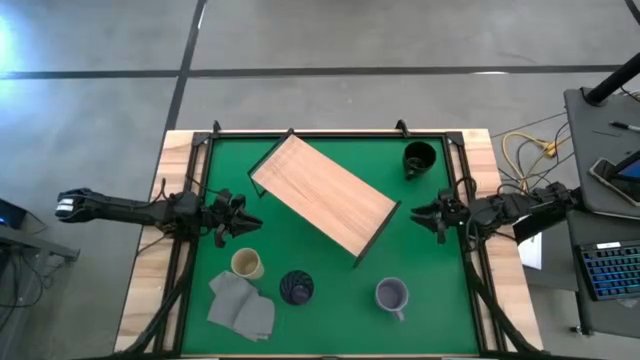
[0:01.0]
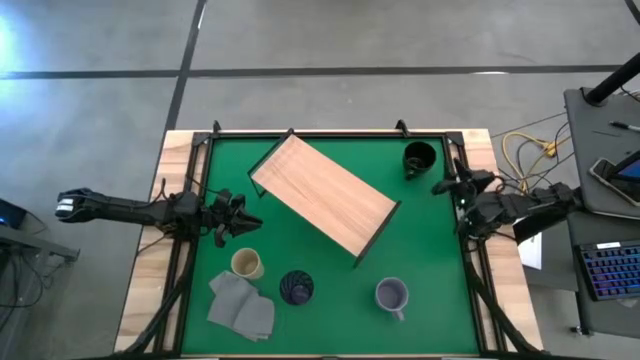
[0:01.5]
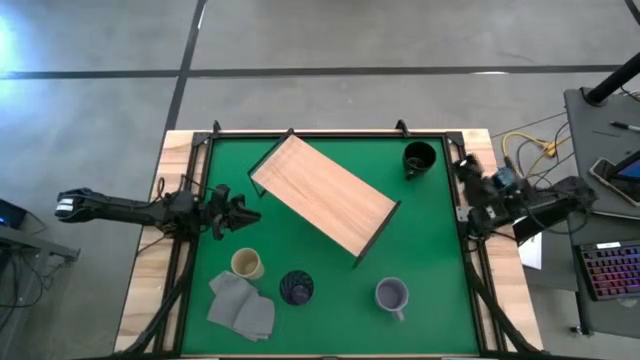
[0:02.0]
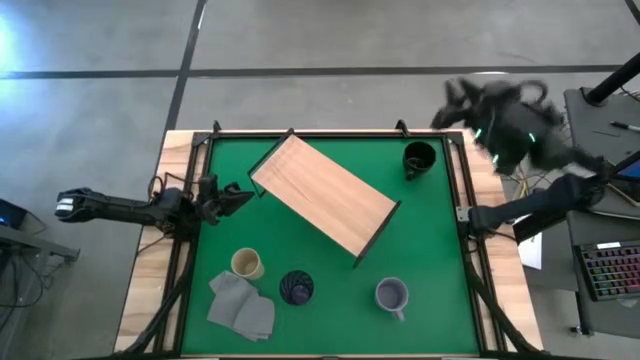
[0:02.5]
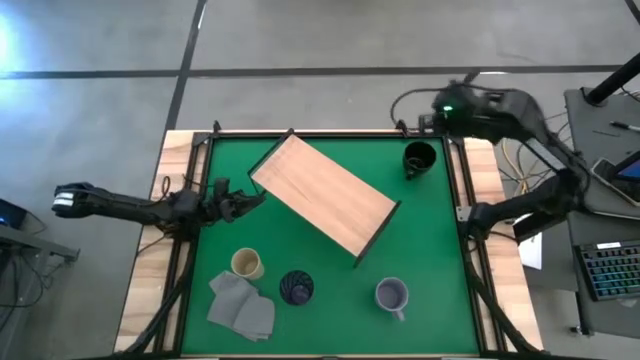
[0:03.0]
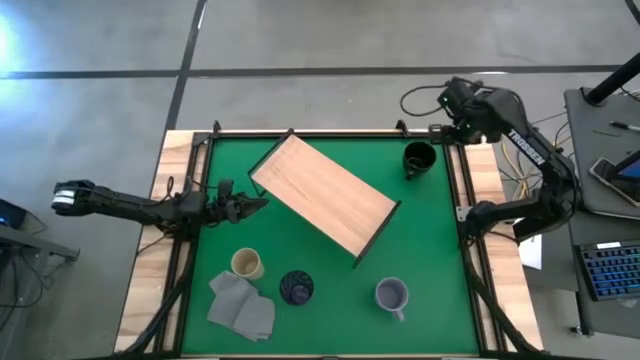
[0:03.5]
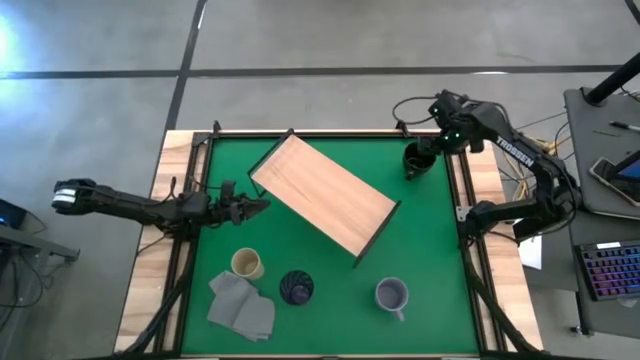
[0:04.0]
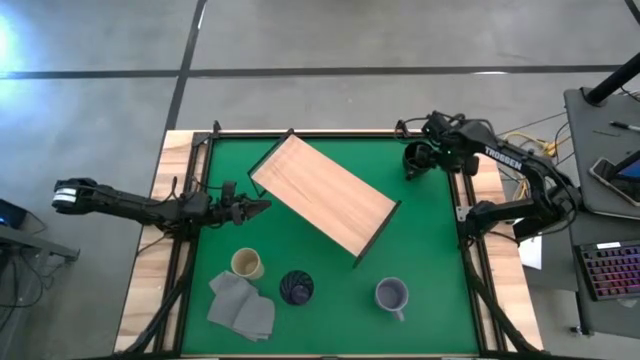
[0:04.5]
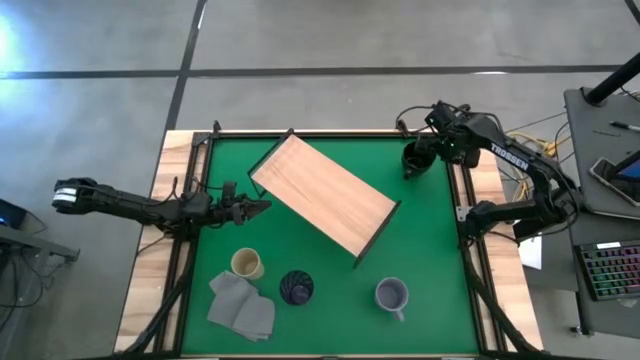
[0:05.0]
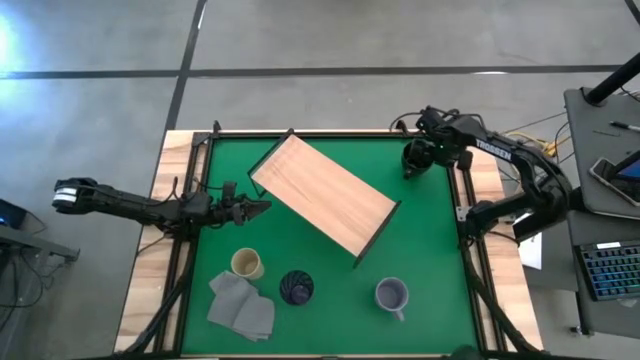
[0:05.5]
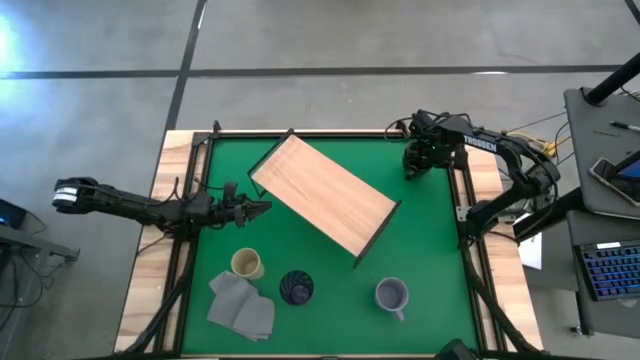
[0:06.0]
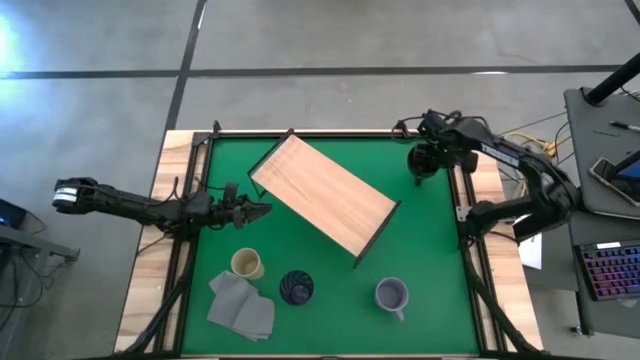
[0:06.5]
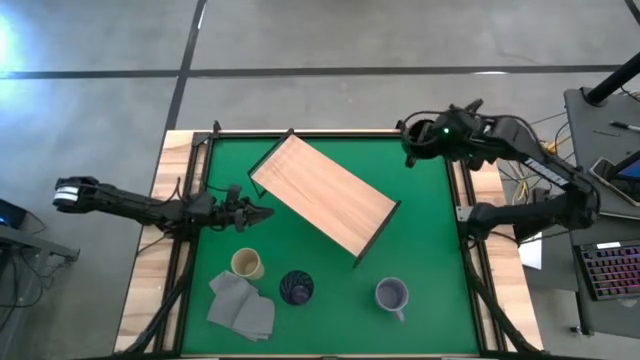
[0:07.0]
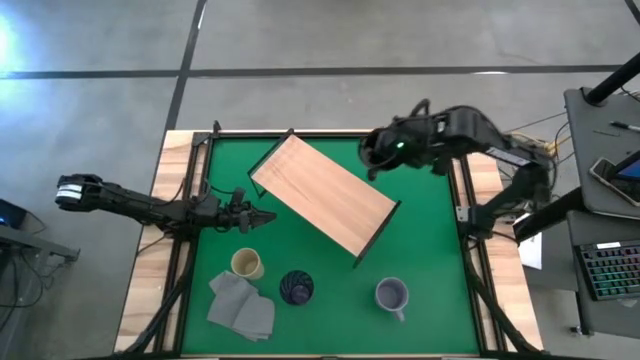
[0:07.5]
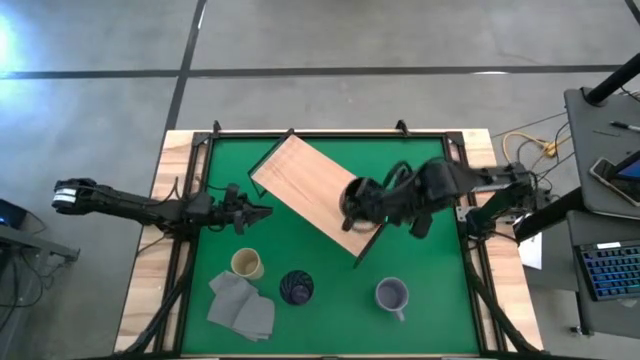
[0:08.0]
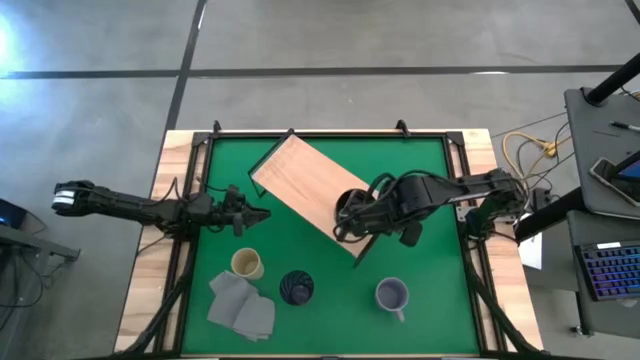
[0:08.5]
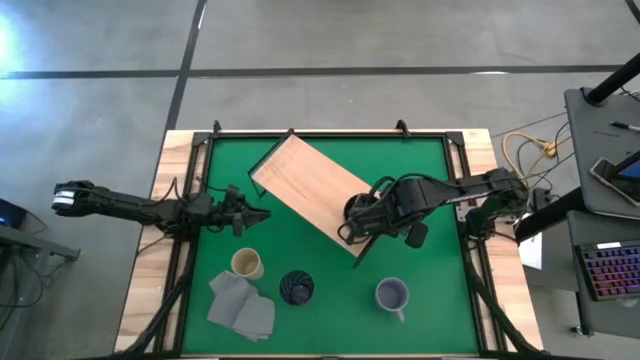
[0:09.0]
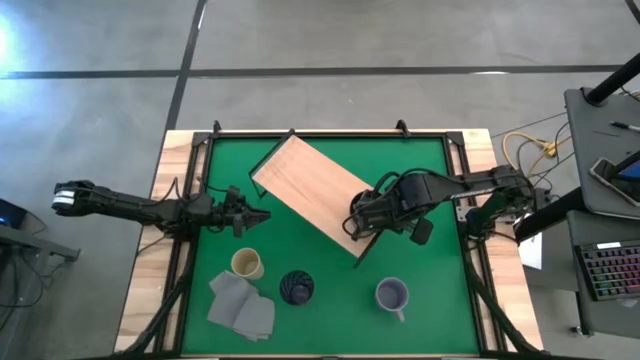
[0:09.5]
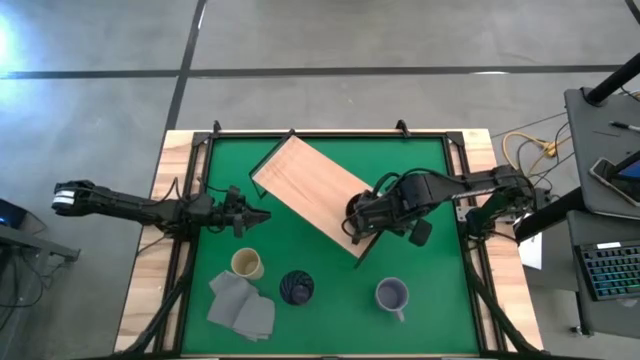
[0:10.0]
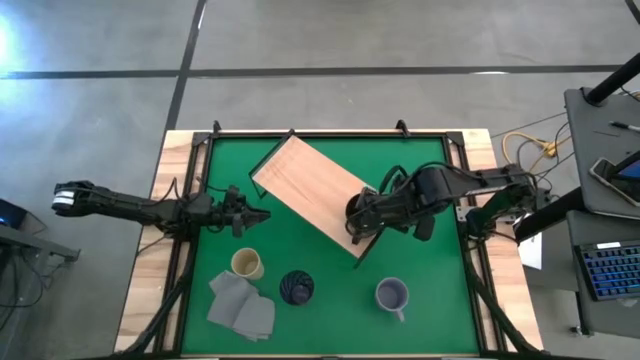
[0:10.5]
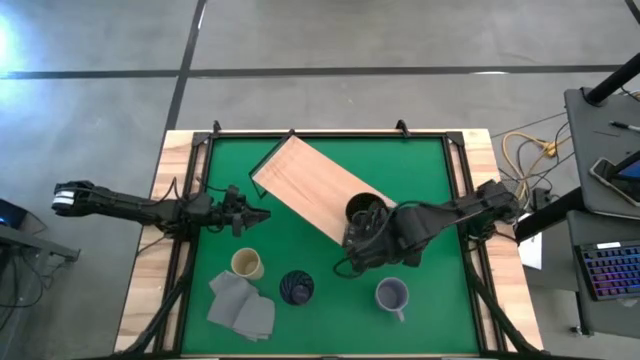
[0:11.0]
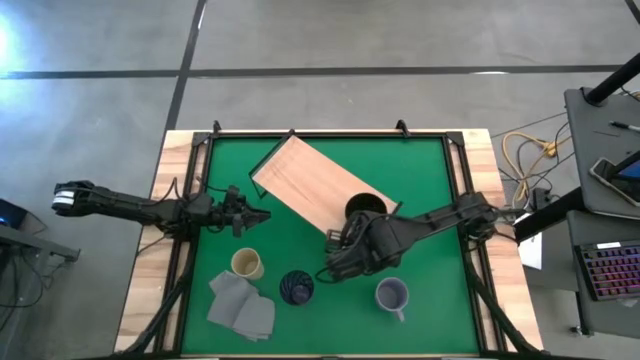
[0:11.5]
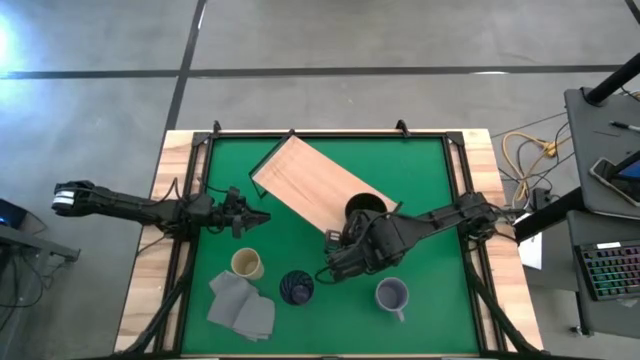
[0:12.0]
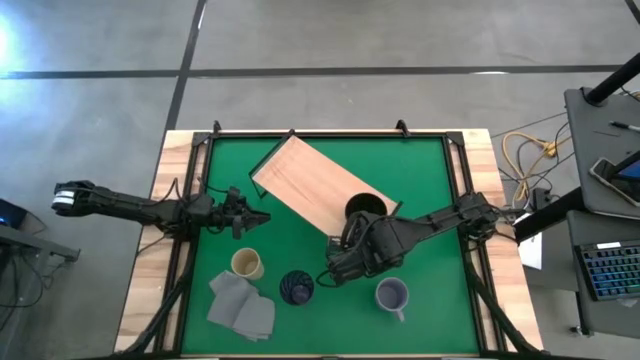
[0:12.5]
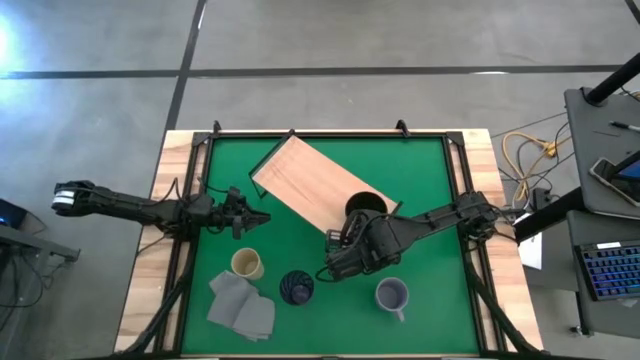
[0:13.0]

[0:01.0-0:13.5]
Task: Stack small to large cups/mugs on shelf
Put the black mug on the shelf
